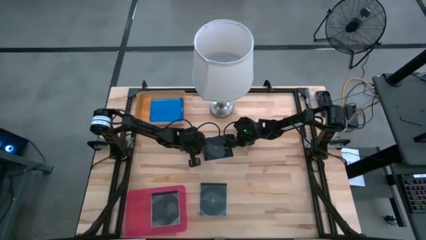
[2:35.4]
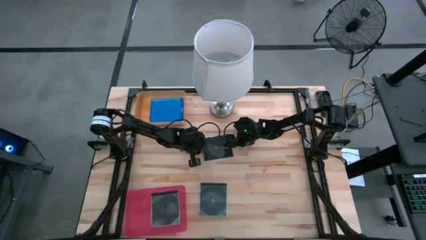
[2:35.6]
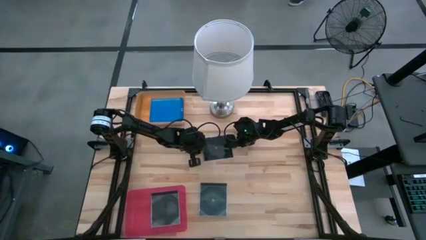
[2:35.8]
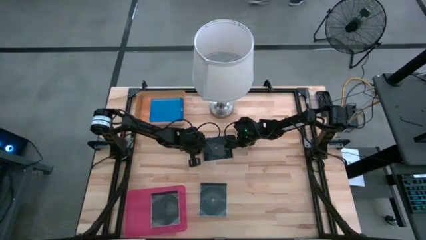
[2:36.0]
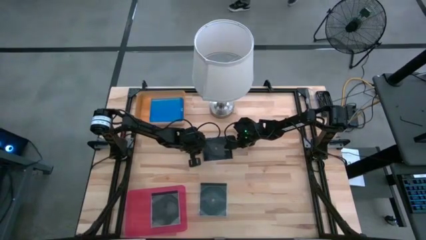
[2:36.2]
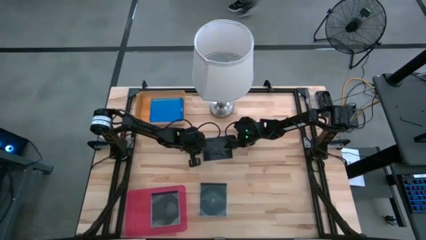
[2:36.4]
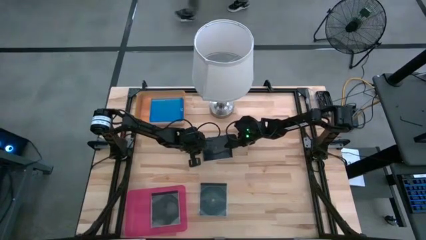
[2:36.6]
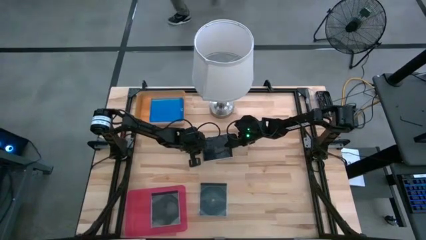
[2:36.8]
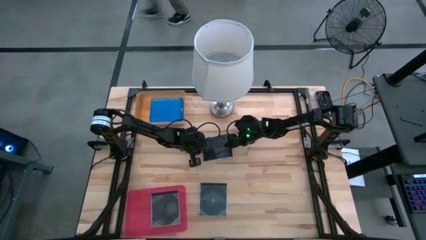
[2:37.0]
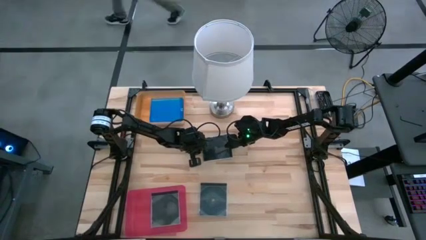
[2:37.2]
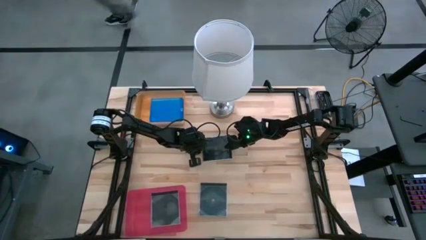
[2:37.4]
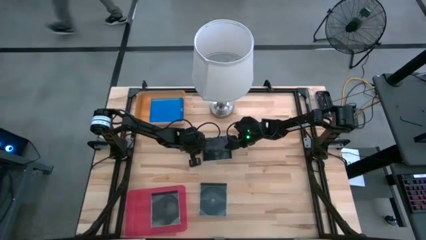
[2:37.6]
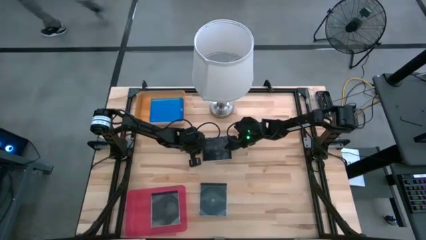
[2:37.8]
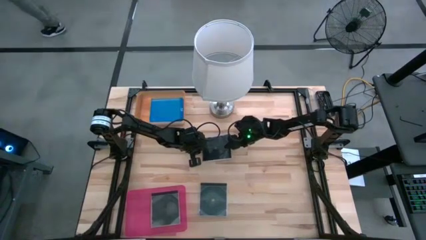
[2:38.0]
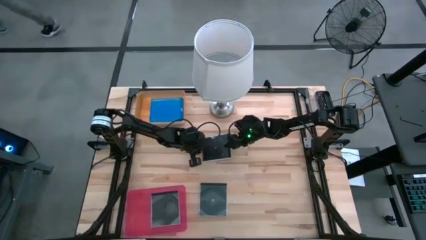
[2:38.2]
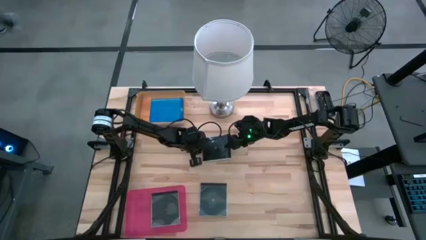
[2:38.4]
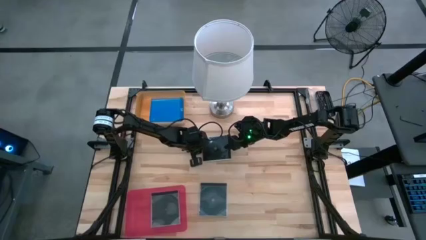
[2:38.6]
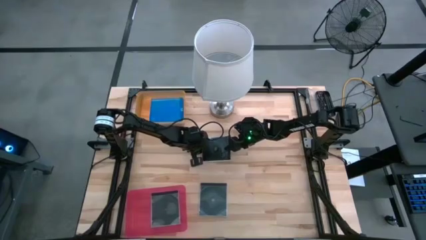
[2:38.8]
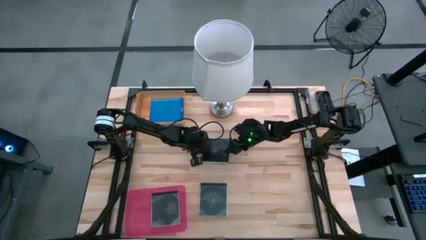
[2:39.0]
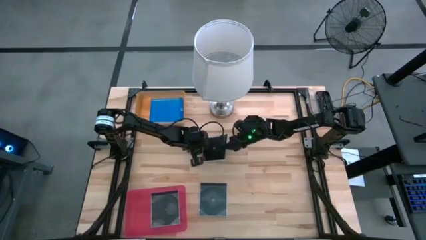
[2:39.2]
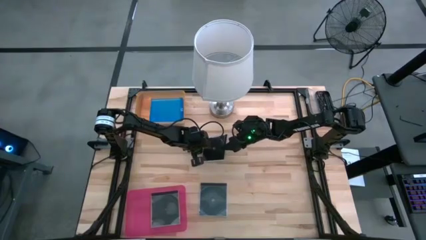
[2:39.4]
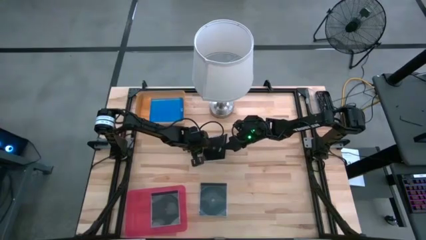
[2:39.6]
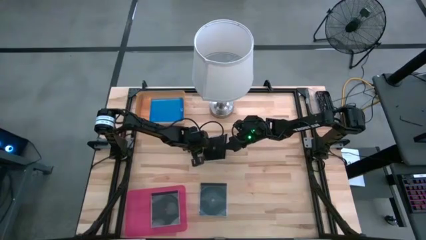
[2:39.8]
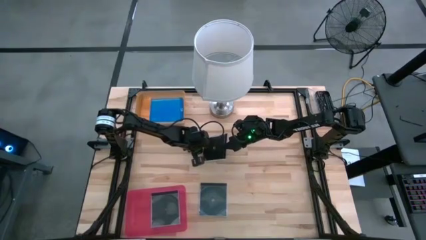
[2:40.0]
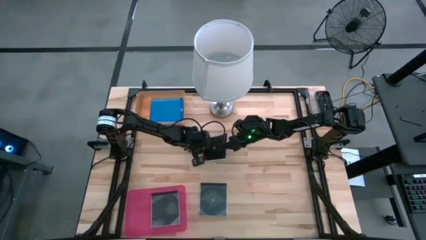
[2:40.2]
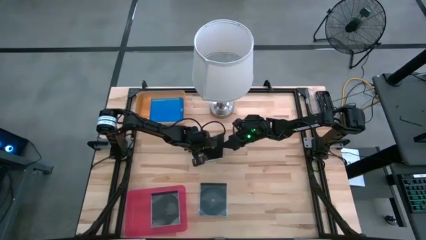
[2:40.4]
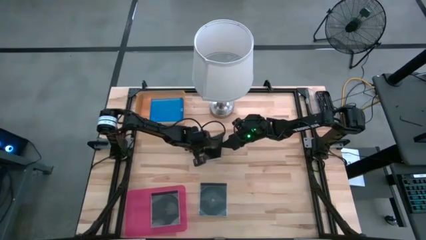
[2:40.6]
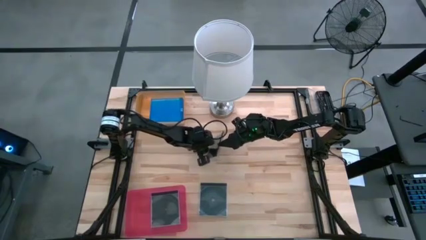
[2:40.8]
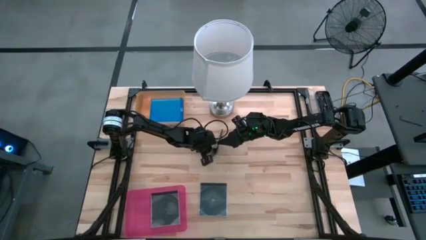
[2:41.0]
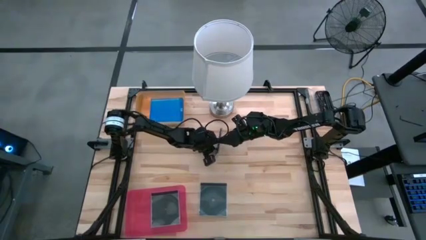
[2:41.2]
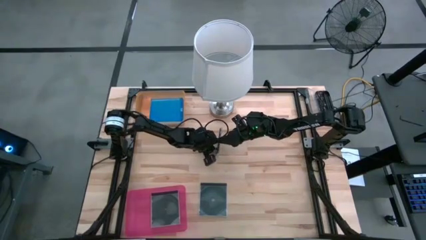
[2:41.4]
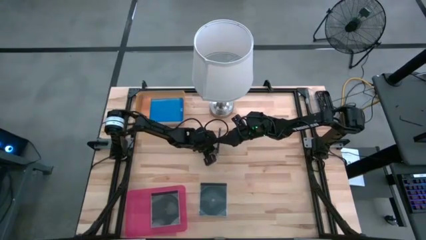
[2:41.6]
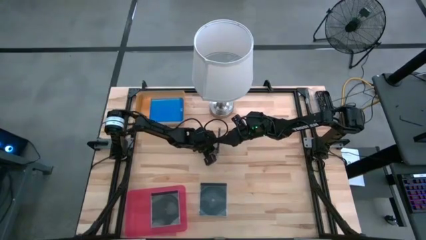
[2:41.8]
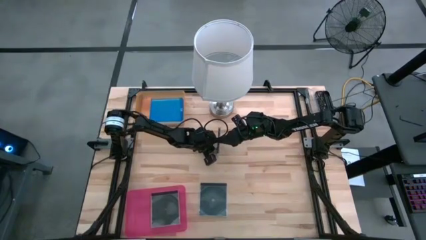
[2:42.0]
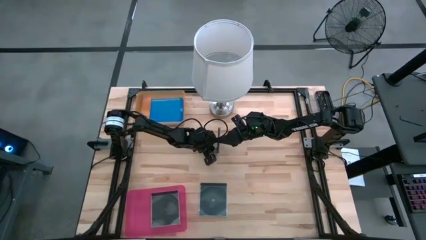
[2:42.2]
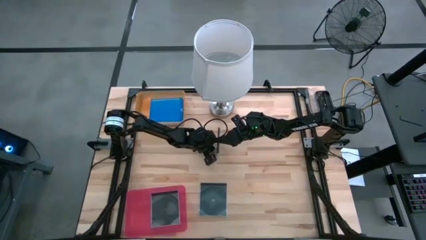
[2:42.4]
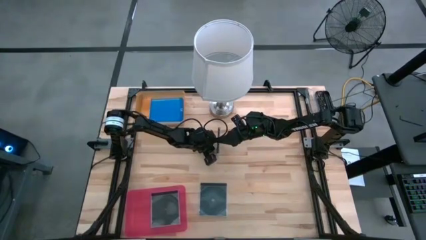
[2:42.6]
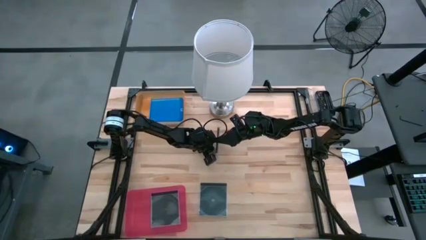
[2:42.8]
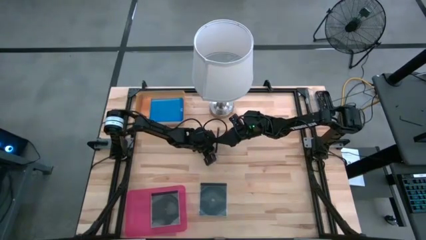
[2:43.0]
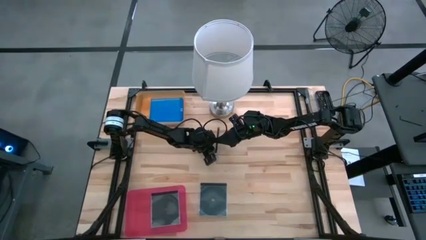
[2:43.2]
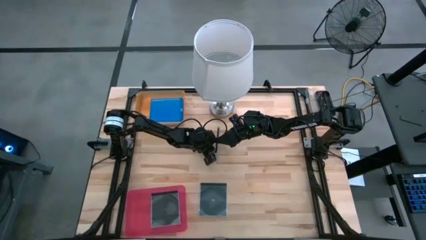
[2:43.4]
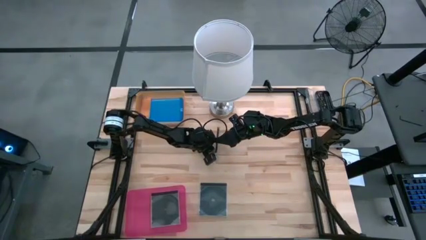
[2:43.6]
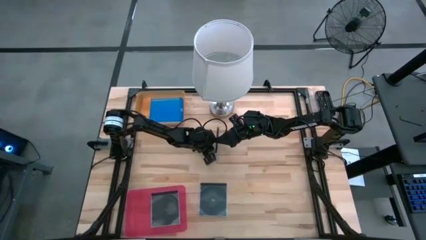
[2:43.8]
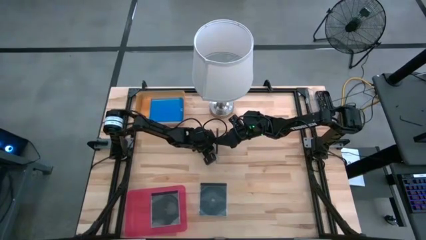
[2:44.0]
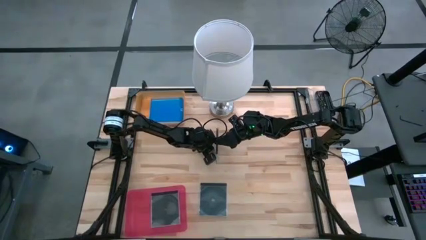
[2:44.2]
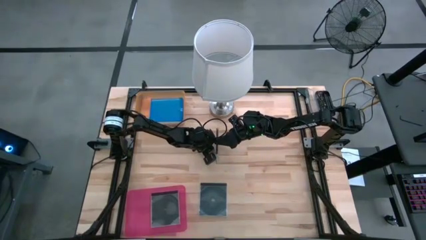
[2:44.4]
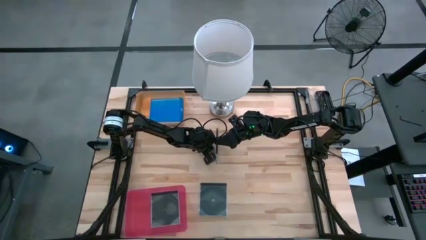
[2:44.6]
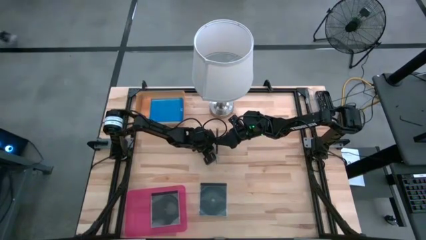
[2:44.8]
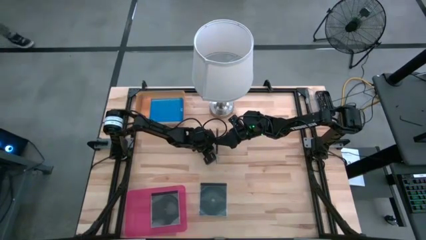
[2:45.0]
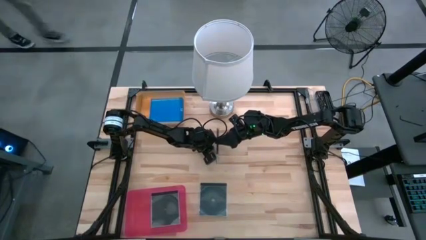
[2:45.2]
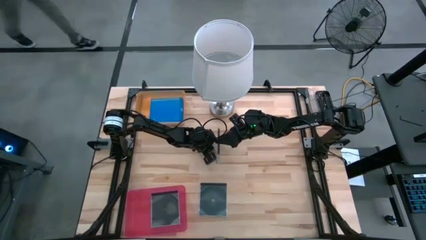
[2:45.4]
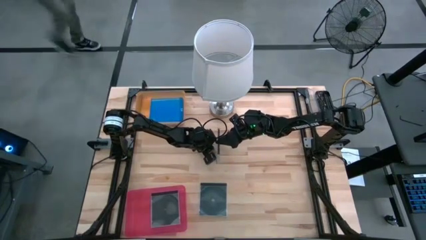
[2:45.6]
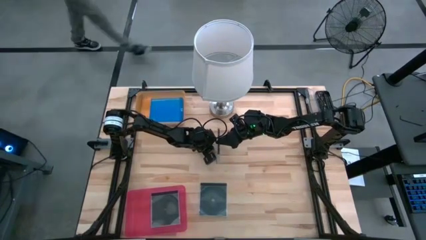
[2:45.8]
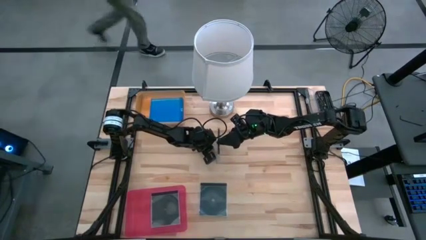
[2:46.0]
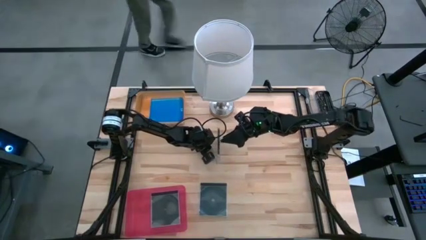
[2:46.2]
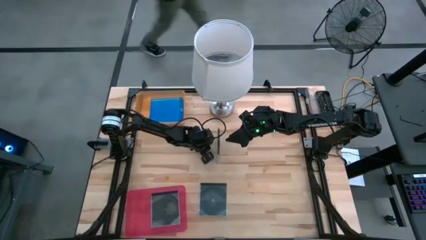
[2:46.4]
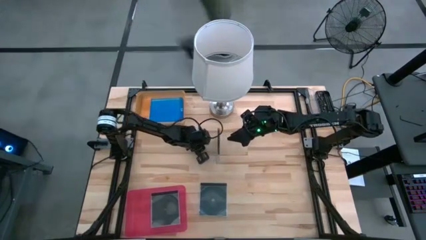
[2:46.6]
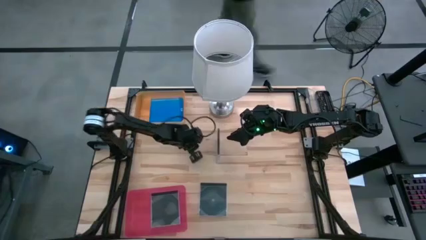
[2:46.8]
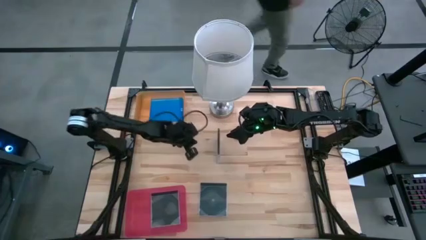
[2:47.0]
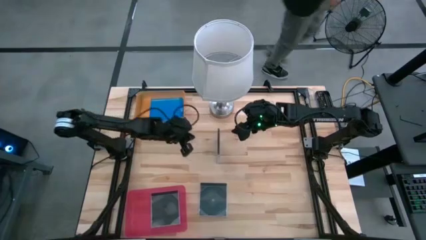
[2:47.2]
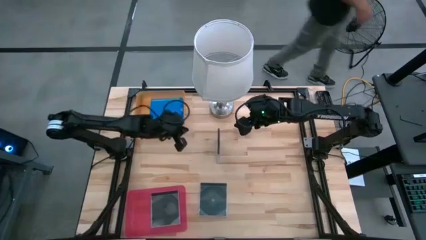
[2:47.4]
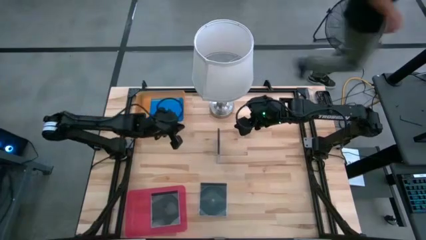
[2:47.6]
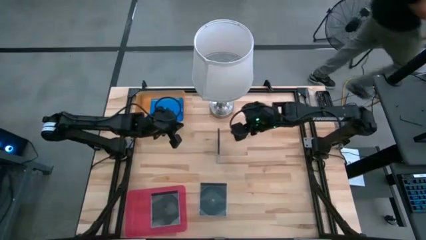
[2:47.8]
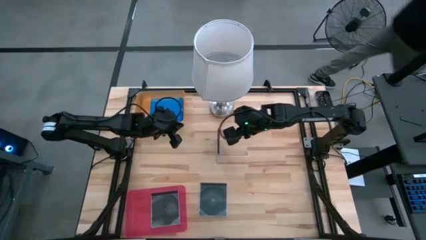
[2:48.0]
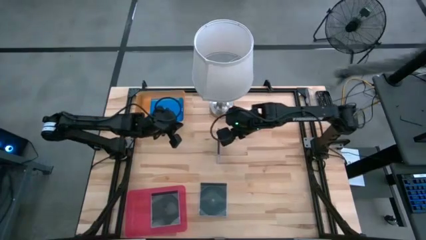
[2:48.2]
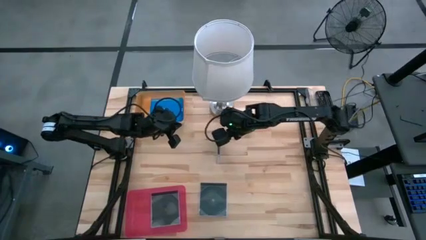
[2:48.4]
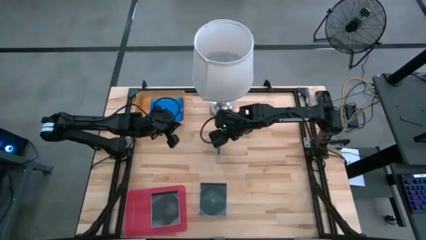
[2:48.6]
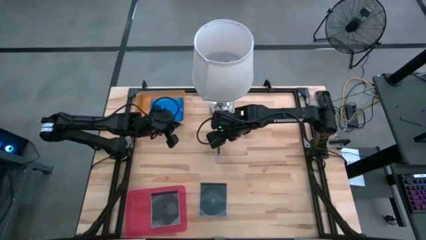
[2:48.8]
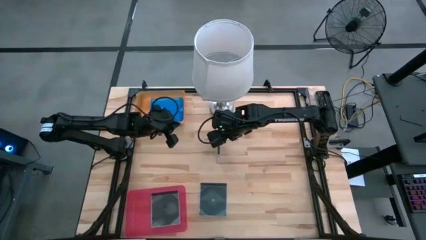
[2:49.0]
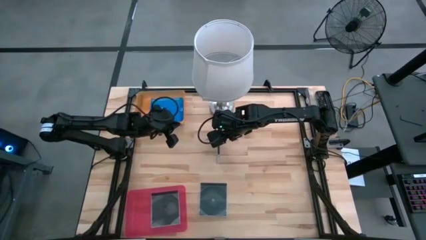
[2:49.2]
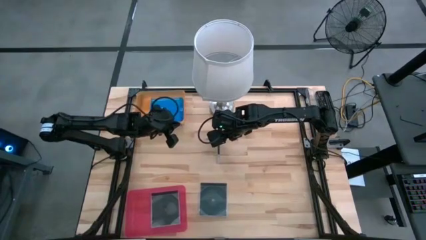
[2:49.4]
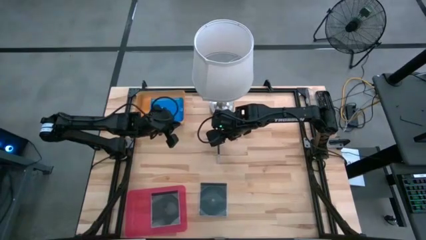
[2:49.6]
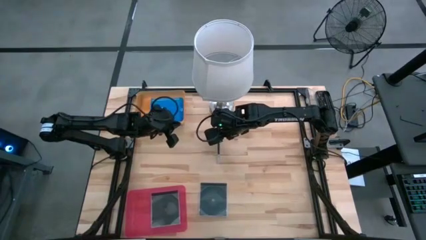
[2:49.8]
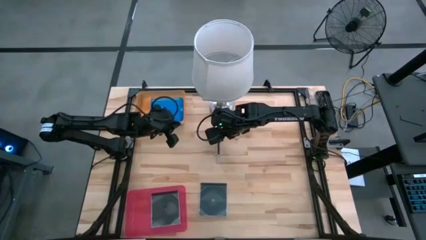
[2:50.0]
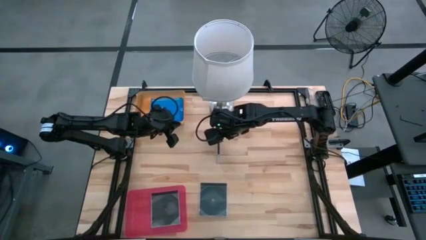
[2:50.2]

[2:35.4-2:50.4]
Task: Pick & place jewel cases by type
Put the top black cd case into the pink bin

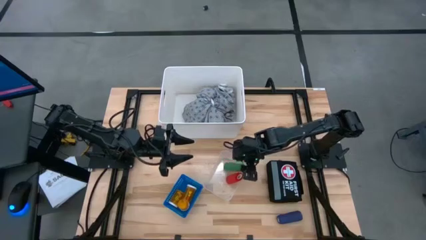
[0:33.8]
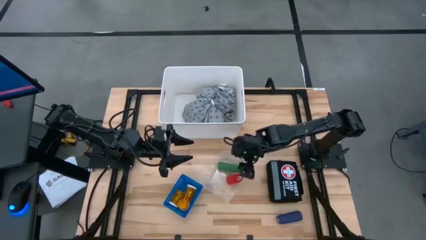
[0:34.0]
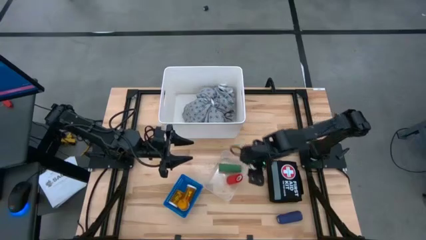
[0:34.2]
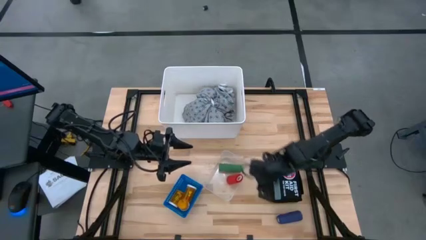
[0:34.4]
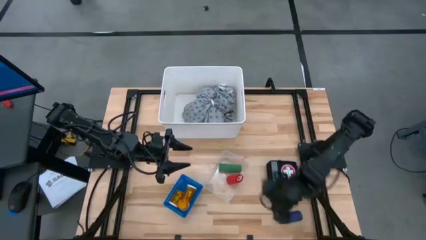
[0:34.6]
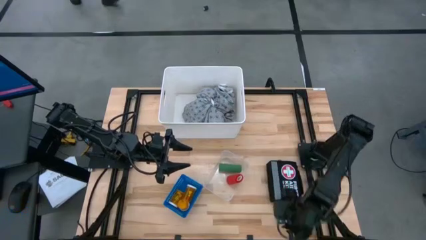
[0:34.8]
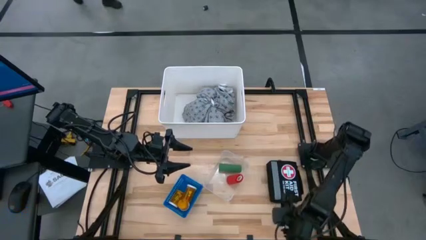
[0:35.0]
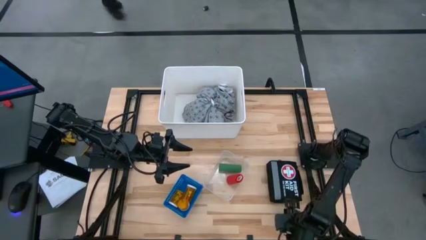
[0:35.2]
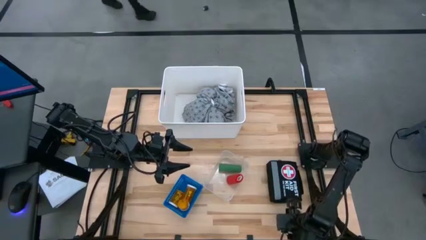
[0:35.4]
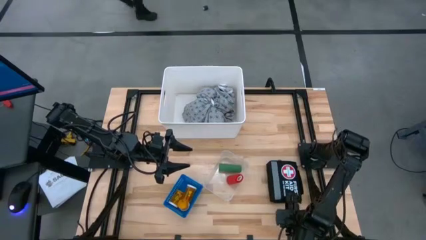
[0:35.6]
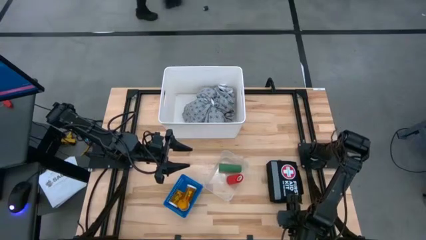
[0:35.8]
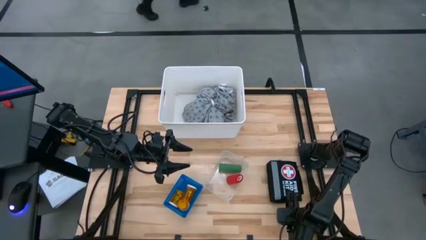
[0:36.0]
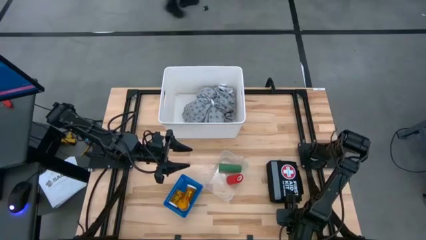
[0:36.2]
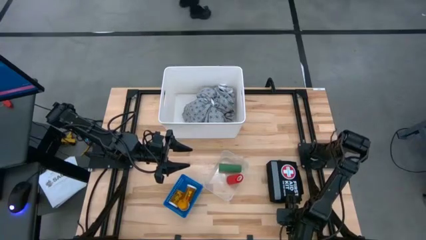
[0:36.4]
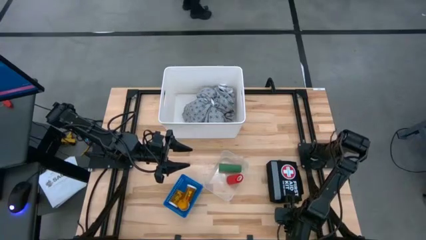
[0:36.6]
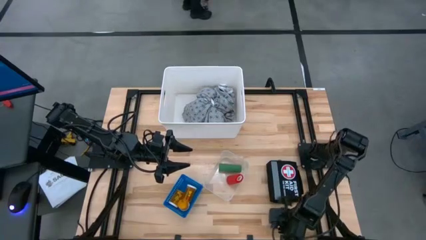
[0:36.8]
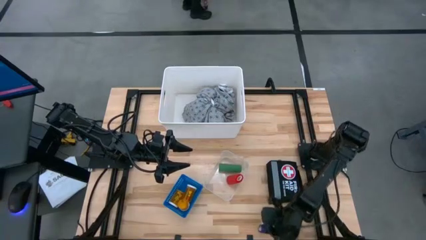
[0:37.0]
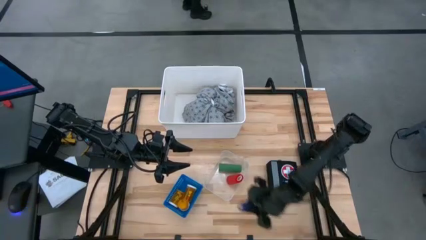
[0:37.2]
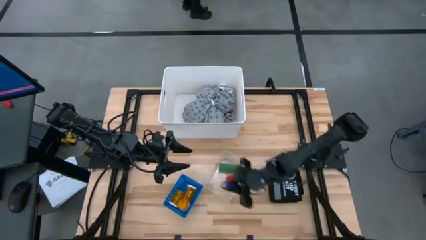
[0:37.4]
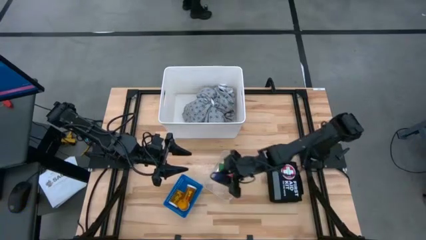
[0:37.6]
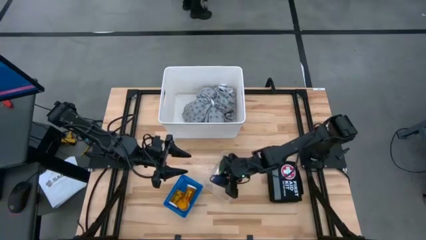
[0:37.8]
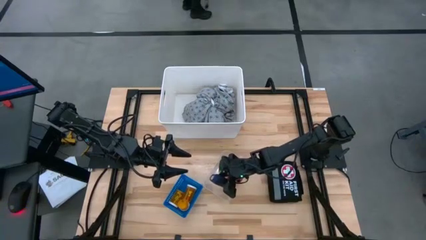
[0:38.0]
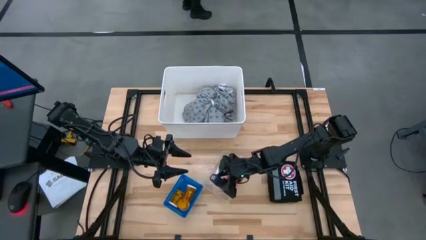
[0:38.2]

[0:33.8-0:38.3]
Task: Pick & Place Medicine items
Put the blue bandage into the transparent bin
